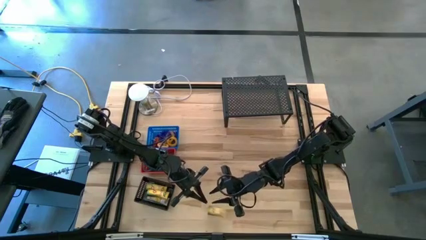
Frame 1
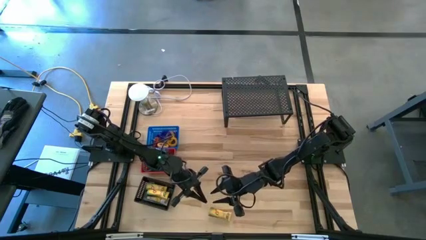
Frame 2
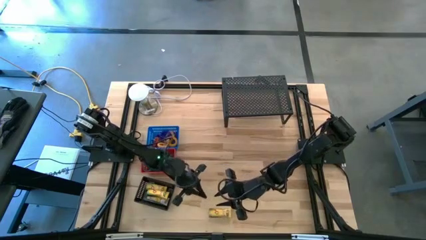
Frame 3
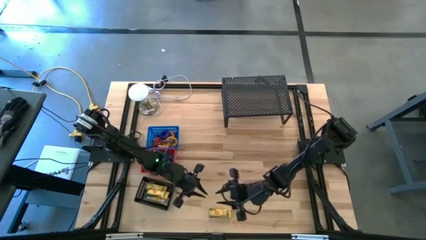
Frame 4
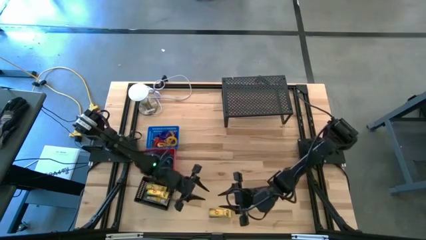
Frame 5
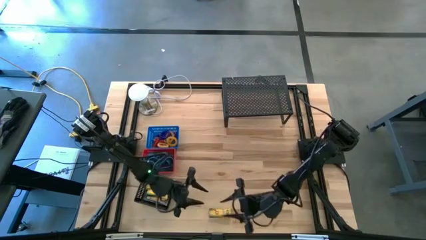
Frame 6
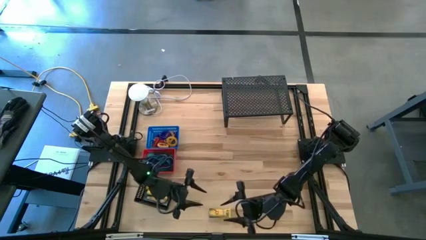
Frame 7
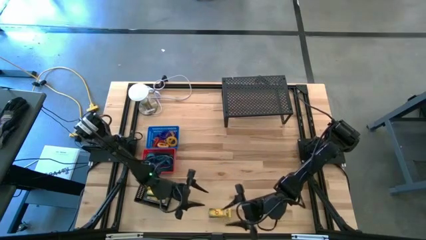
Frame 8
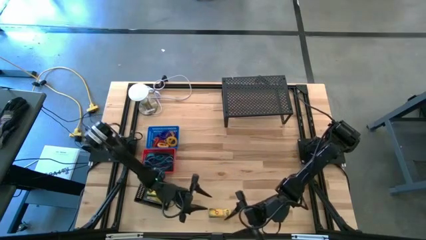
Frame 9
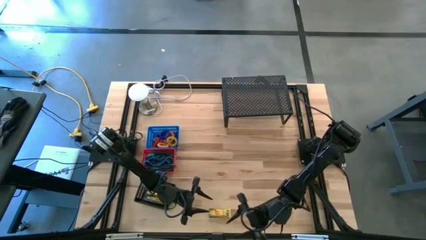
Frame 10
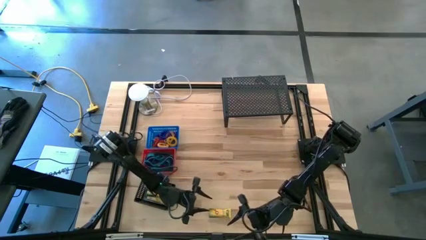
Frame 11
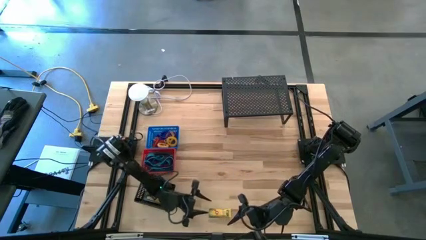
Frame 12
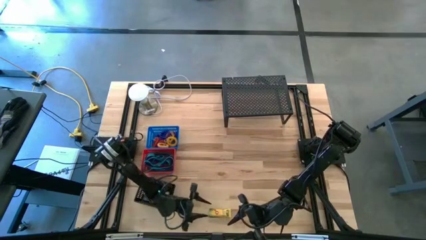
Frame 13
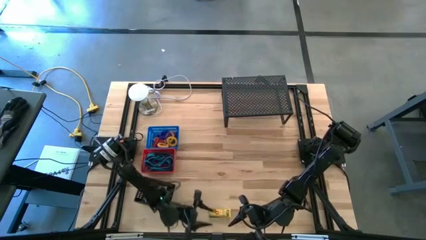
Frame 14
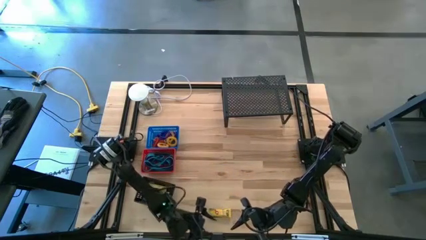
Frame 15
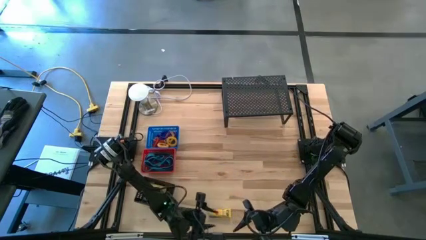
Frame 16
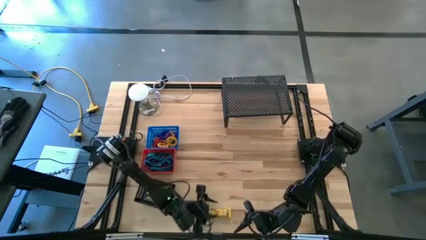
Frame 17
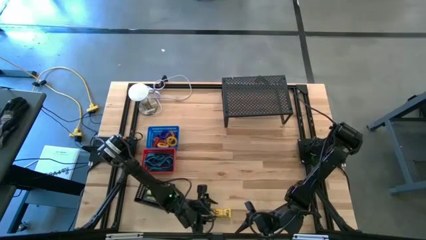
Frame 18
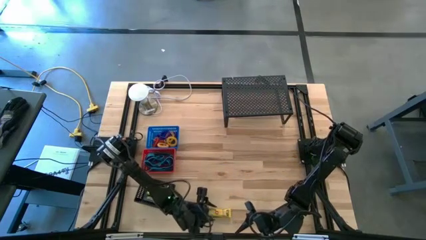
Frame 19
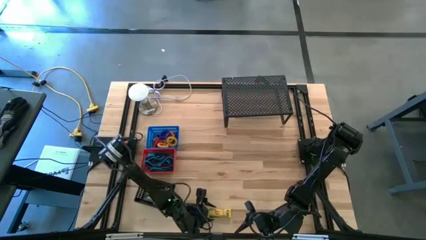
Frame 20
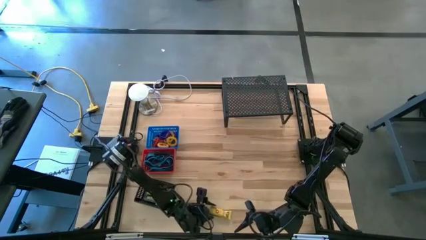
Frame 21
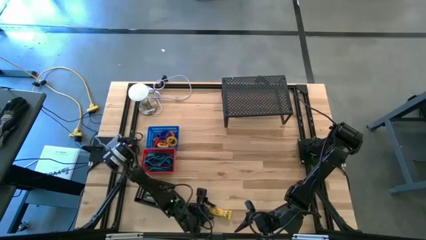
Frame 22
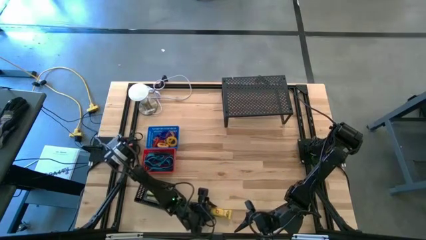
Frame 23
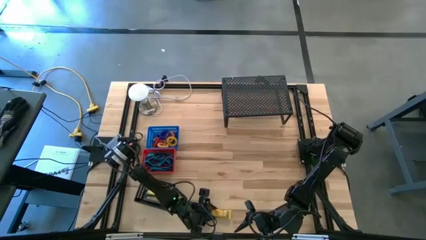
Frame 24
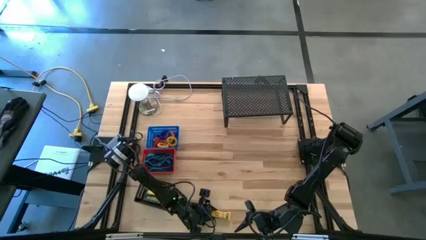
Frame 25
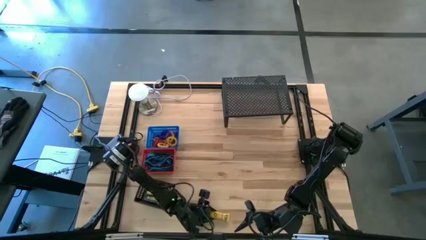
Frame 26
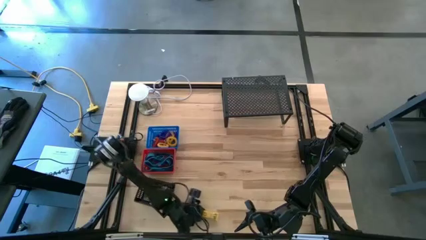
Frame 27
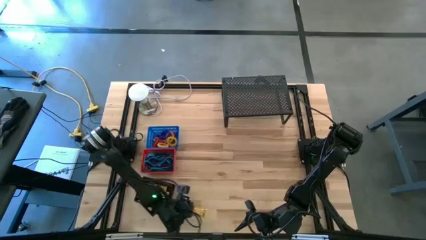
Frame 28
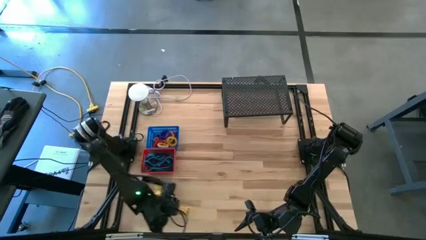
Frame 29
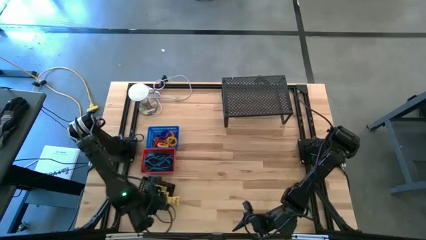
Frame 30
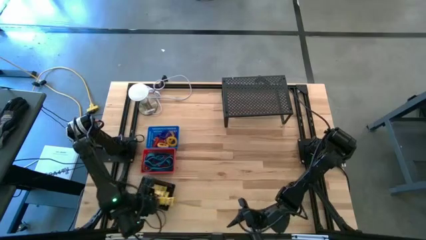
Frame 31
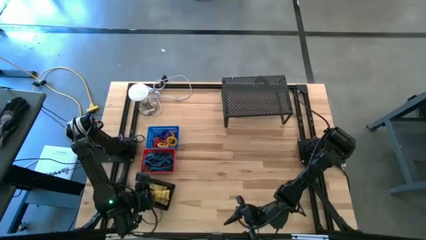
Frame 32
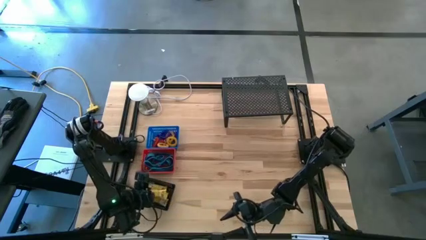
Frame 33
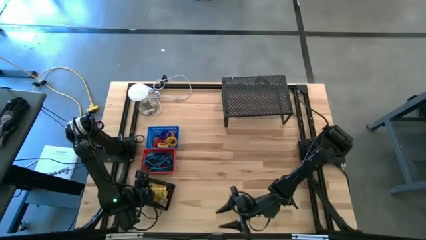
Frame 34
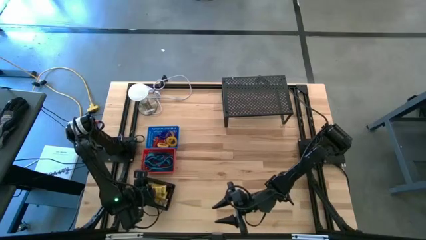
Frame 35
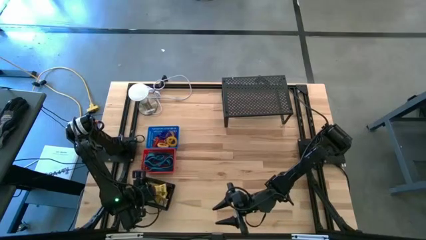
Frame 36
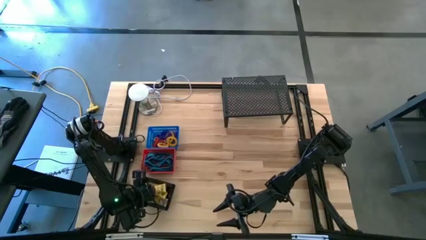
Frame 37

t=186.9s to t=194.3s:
Task: Pick & Place Office Desk Supplies
Put the yellow crayon box into the black bin

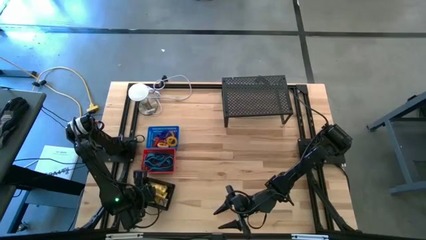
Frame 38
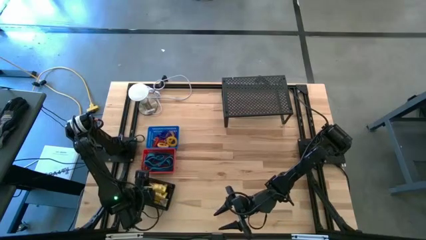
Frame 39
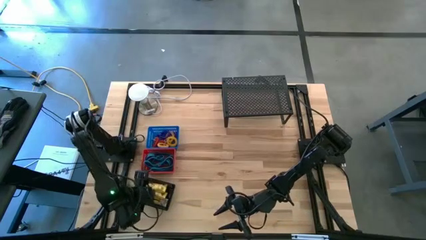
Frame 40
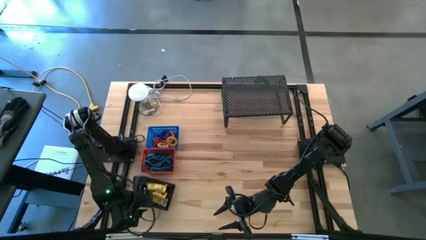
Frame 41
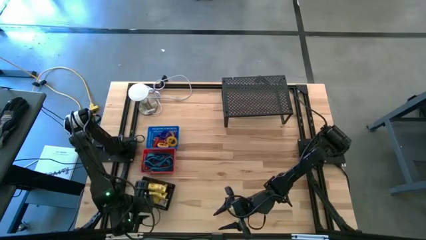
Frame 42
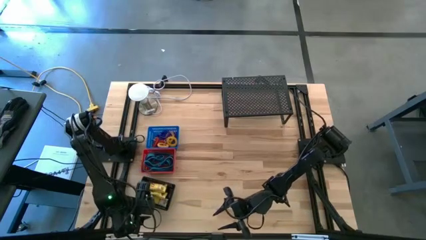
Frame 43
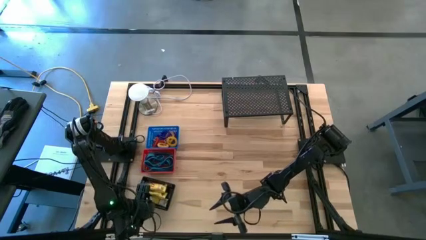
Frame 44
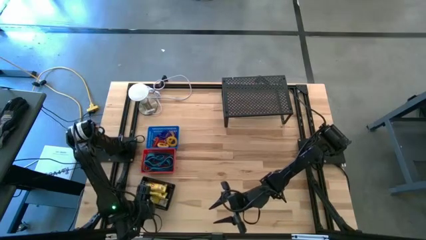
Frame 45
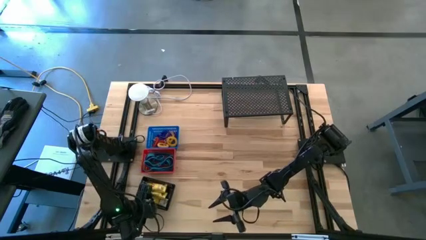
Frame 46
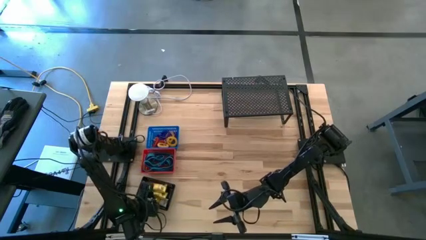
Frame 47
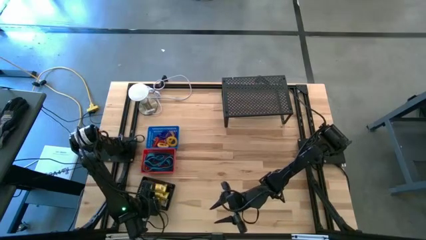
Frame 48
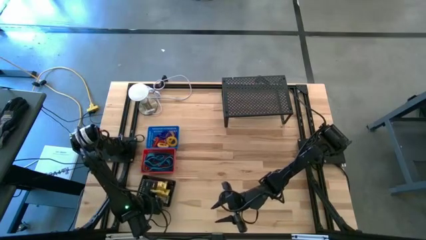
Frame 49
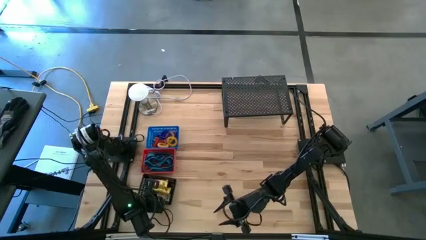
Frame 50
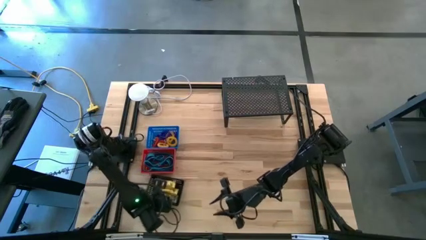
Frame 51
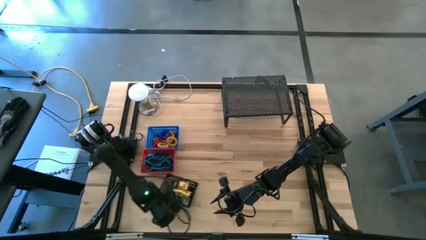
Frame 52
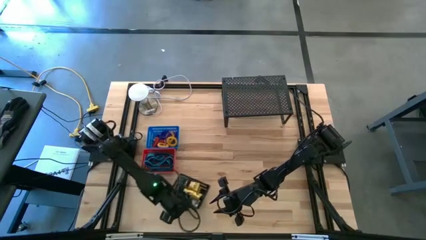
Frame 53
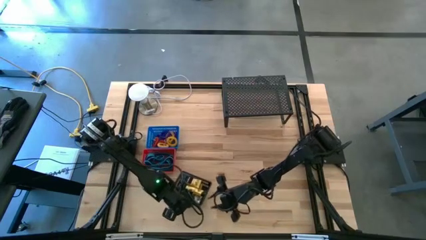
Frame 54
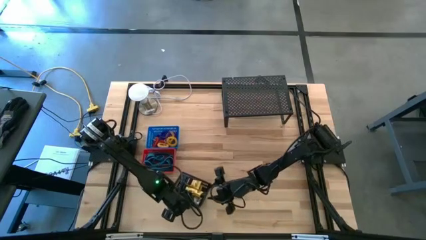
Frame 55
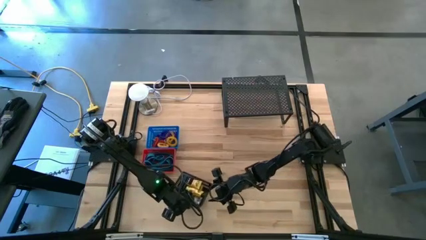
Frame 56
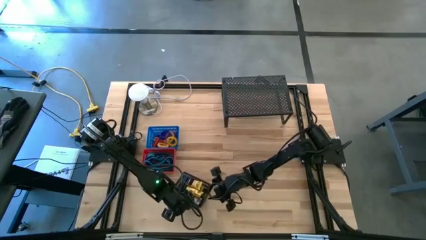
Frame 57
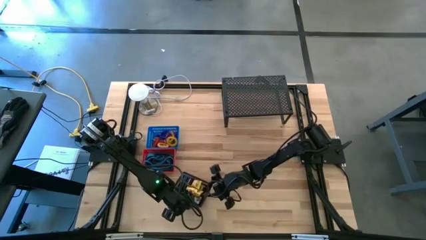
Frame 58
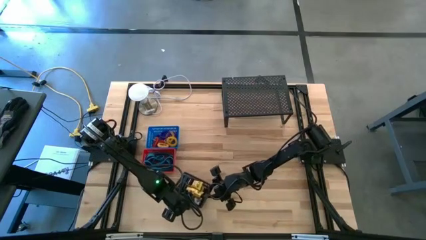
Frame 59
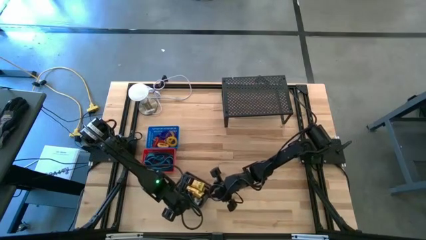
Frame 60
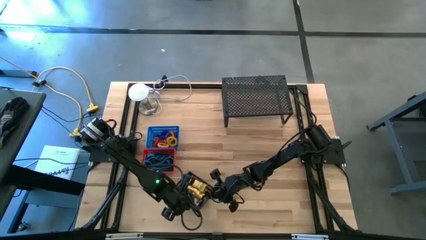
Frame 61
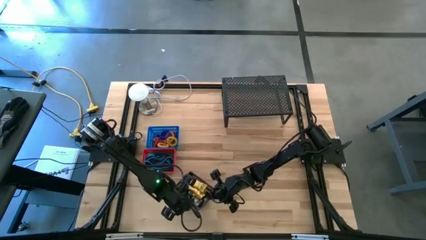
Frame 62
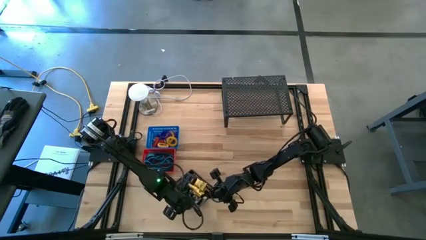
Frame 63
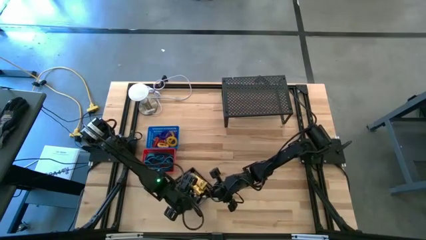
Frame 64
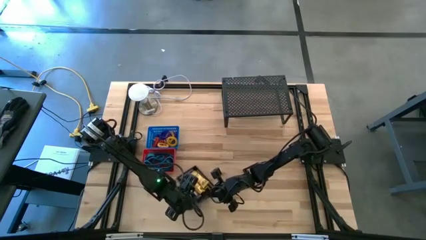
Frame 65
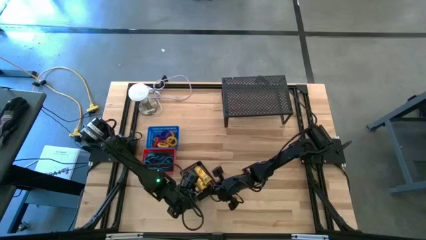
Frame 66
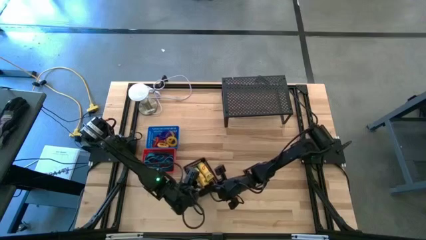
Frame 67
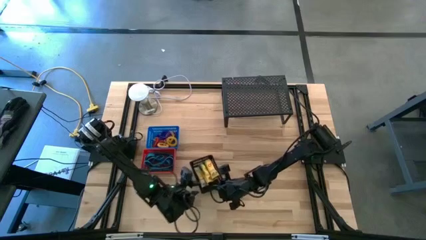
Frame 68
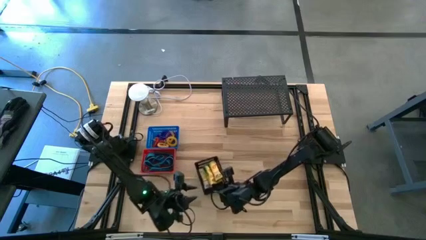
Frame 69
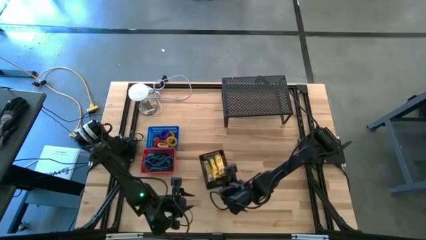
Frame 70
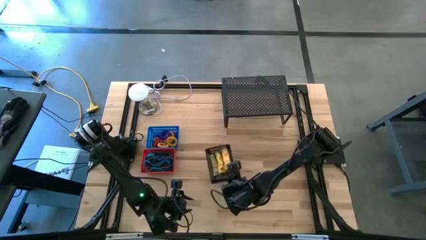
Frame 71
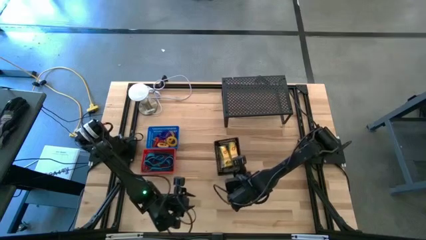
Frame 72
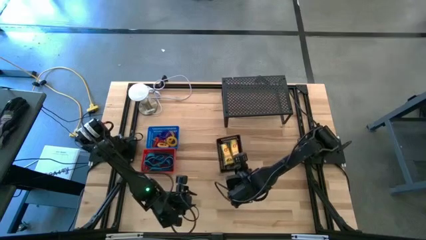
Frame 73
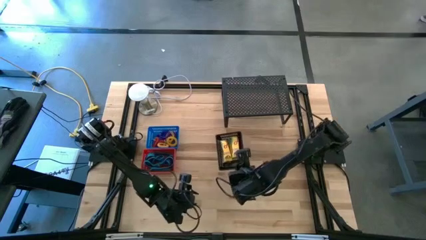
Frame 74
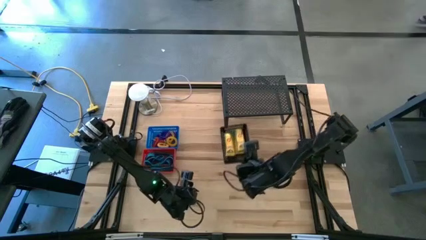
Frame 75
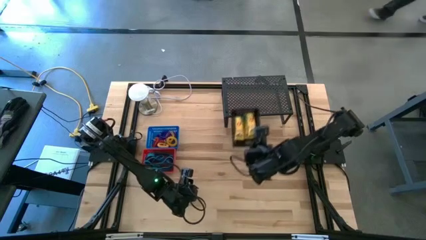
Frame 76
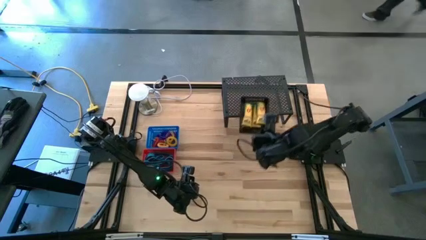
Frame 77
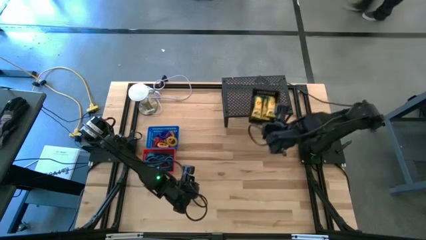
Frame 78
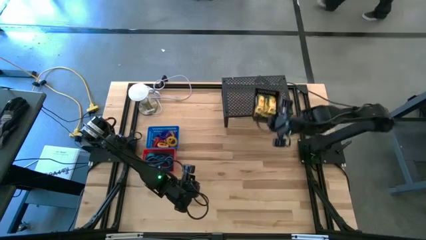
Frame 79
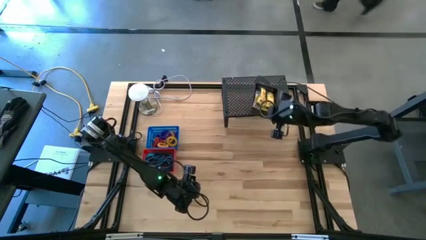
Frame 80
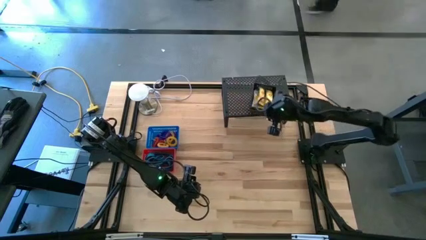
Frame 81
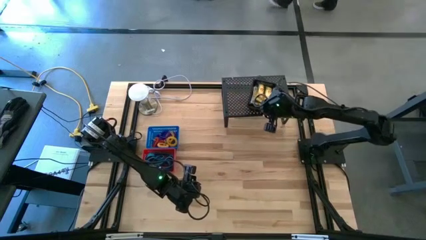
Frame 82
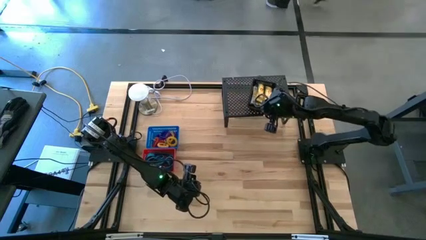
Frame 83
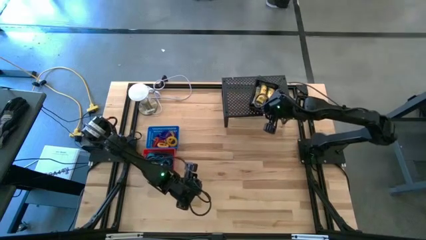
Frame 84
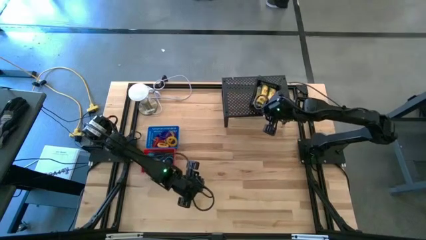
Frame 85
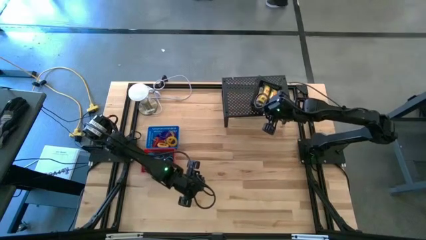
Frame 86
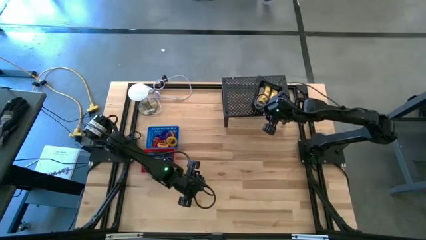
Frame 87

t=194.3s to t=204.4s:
Put the black bin filled with crayon boxes on the shelf
